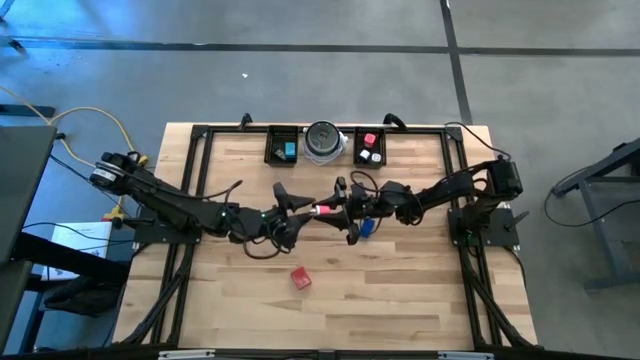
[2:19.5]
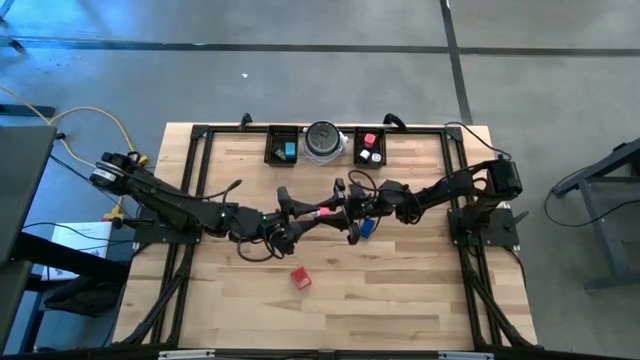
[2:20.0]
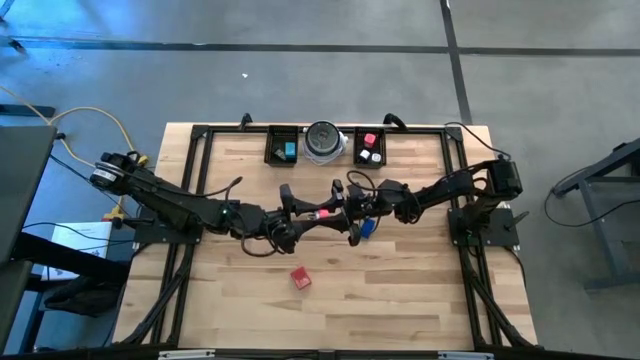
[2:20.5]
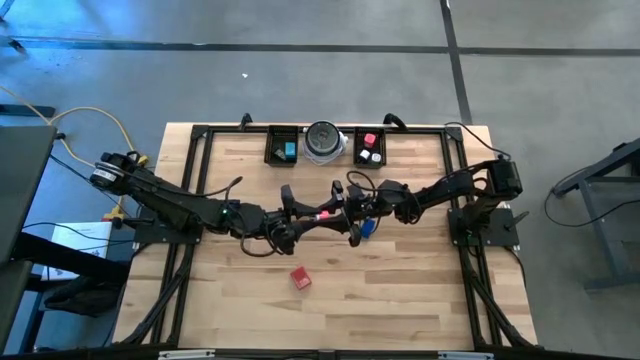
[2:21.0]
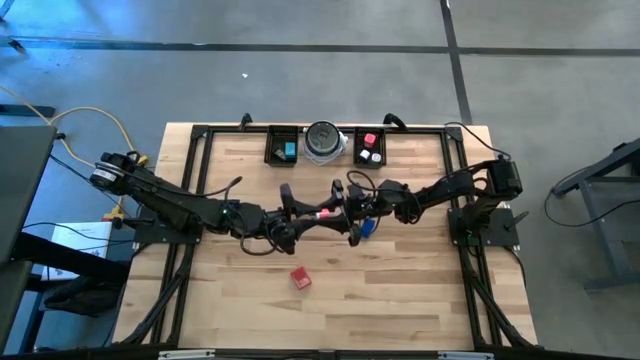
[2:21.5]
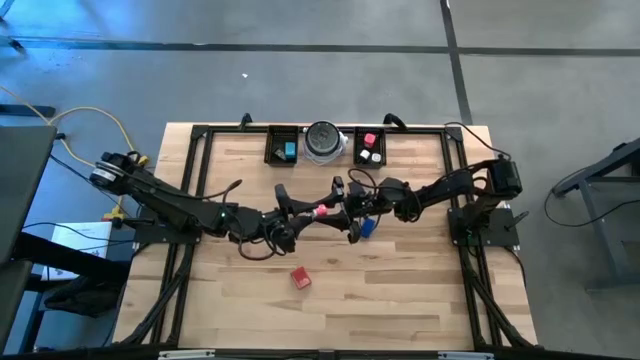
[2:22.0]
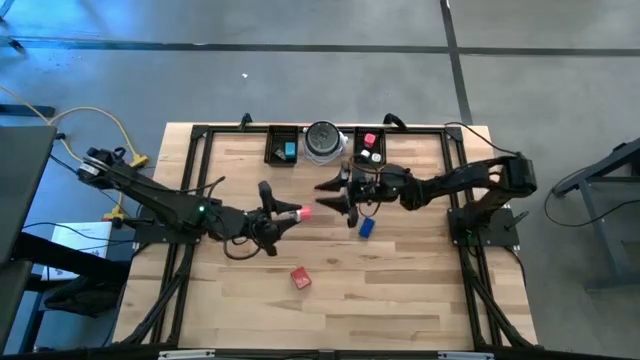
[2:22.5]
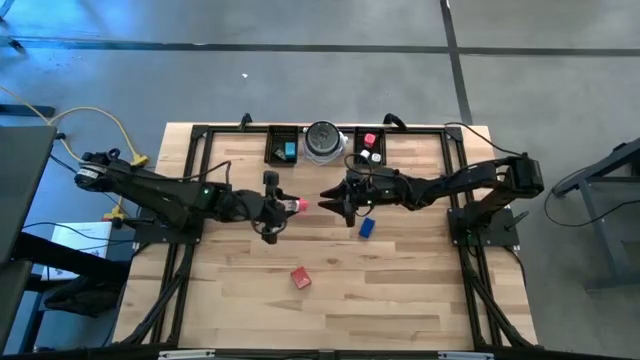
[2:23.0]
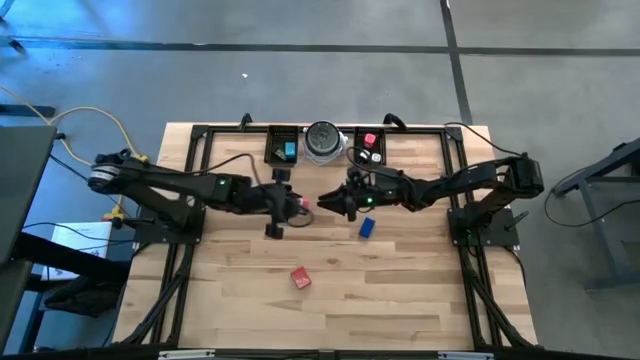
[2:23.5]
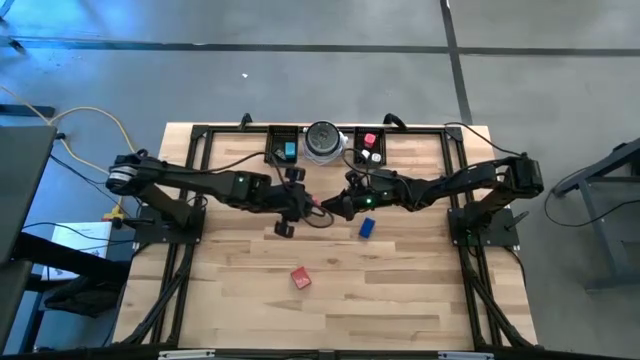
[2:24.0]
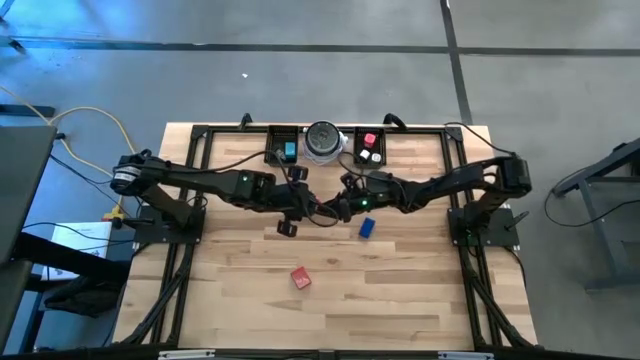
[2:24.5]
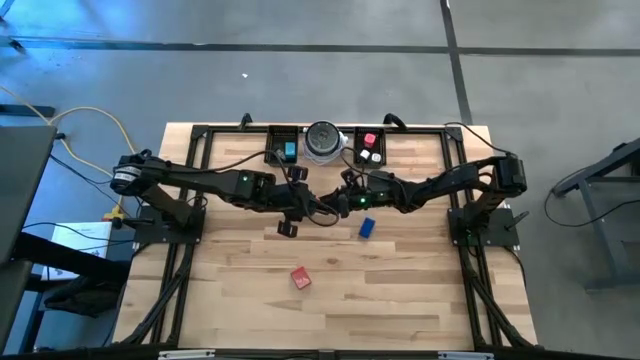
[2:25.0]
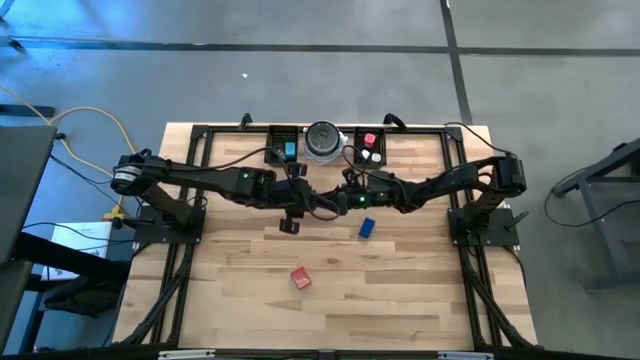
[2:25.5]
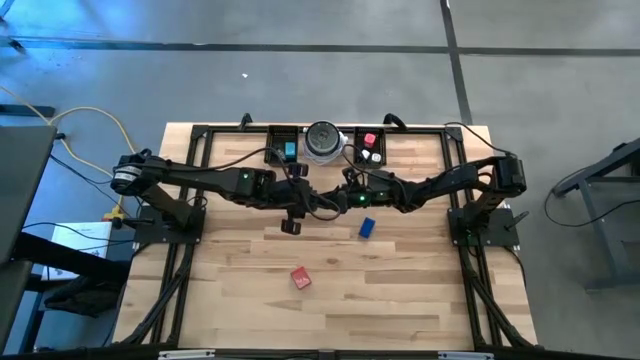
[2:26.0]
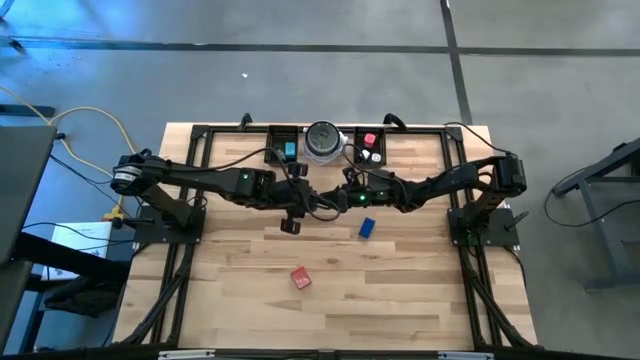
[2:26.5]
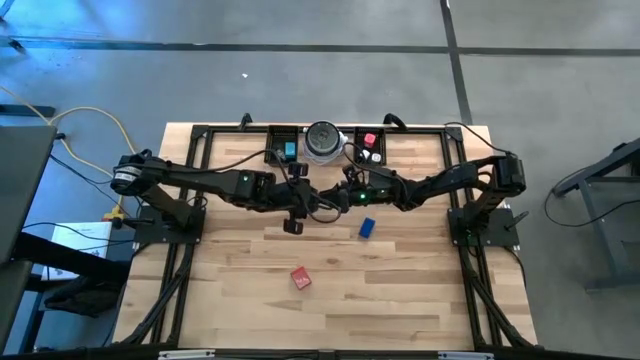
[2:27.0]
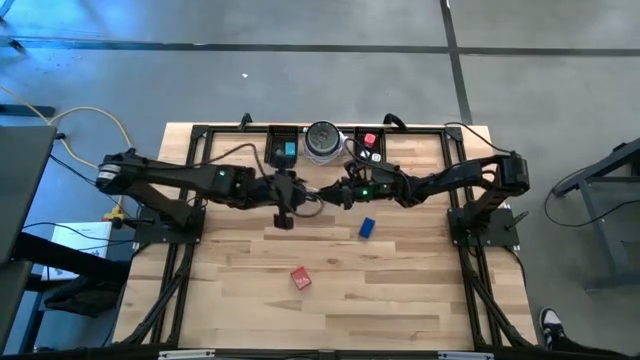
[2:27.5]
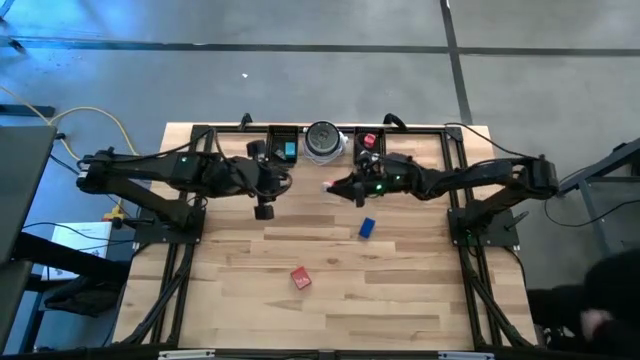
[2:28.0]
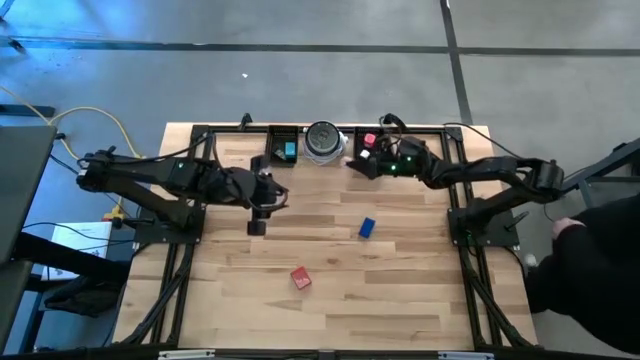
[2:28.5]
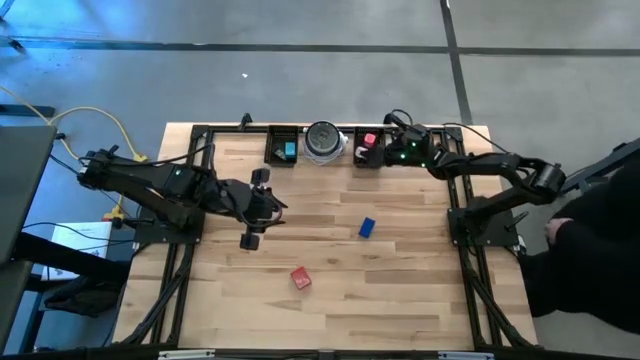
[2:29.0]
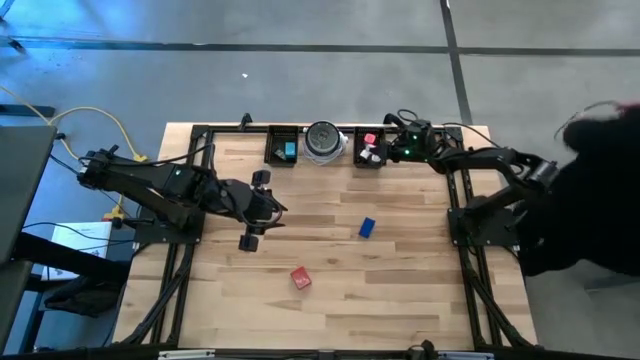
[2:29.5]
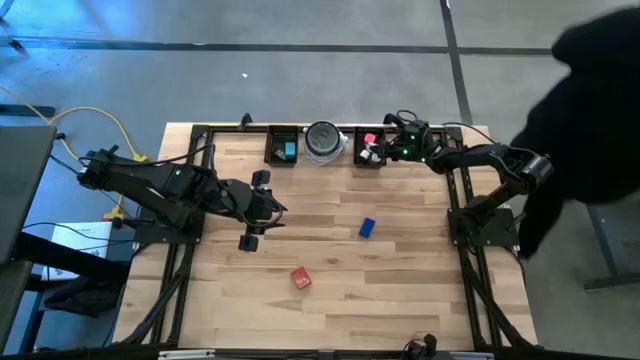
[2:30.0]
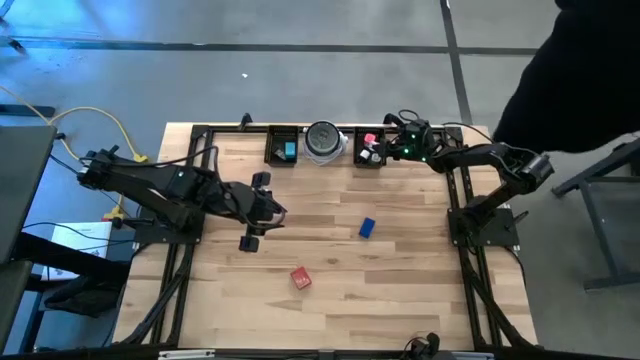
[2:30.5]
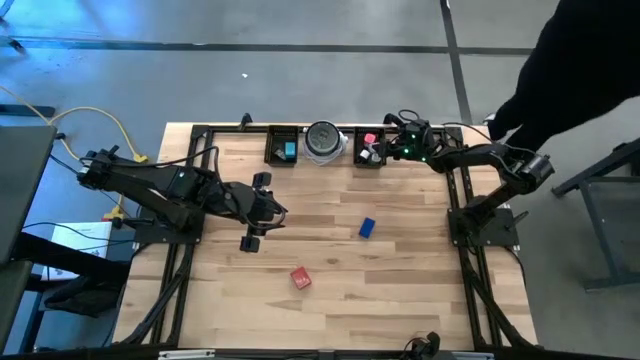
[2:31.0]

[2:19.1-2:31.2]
Task: Pick & Place Office items
Put the pink white charger adapter into the right black basket

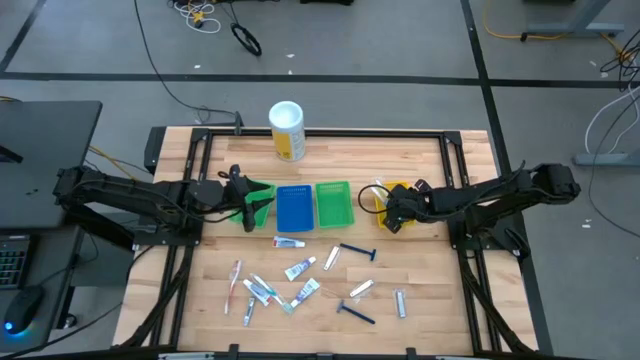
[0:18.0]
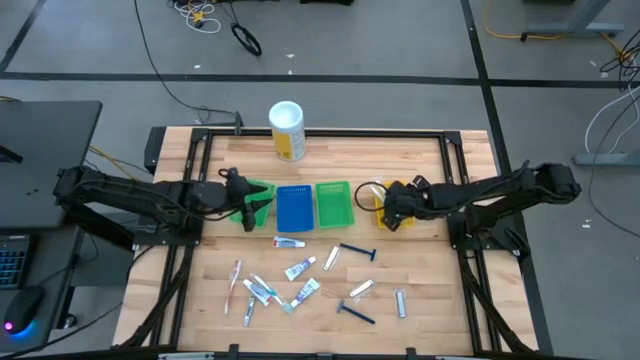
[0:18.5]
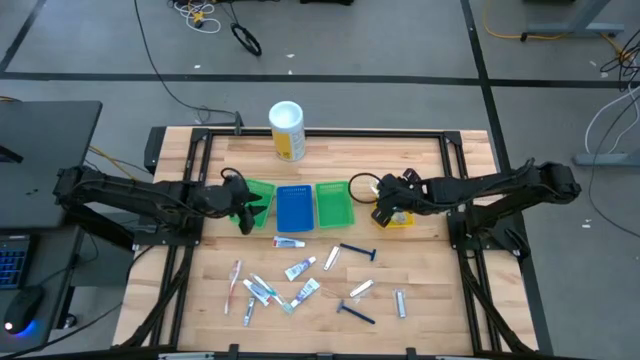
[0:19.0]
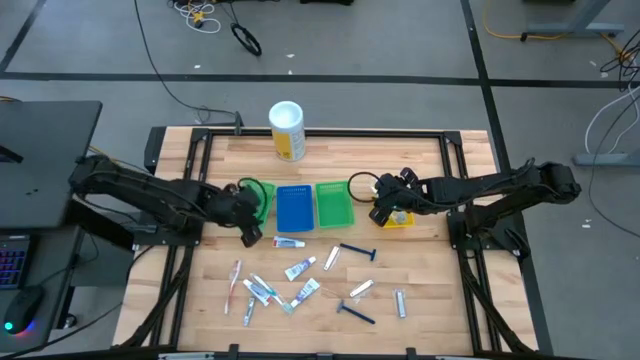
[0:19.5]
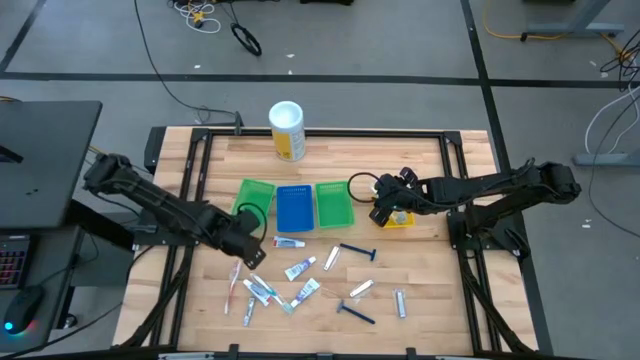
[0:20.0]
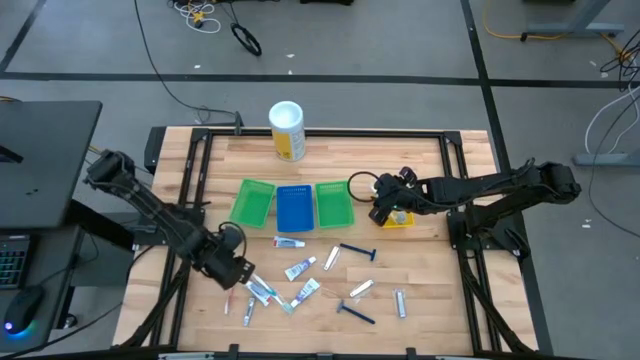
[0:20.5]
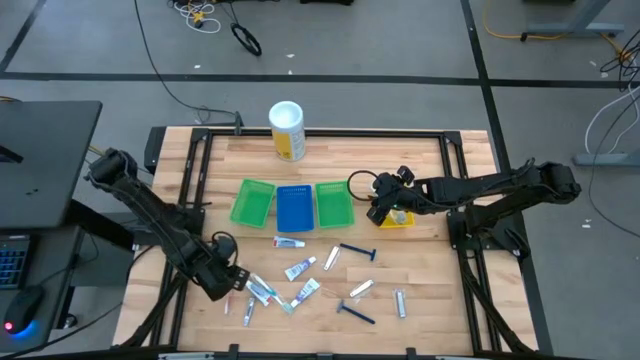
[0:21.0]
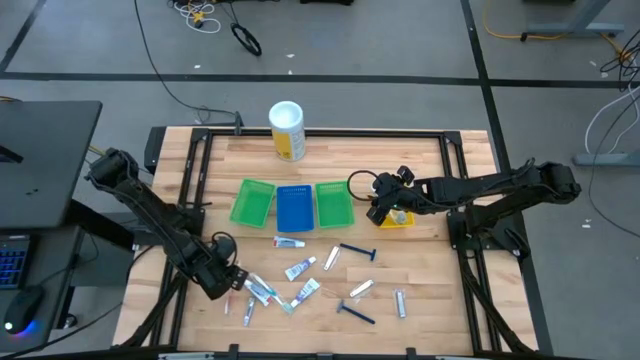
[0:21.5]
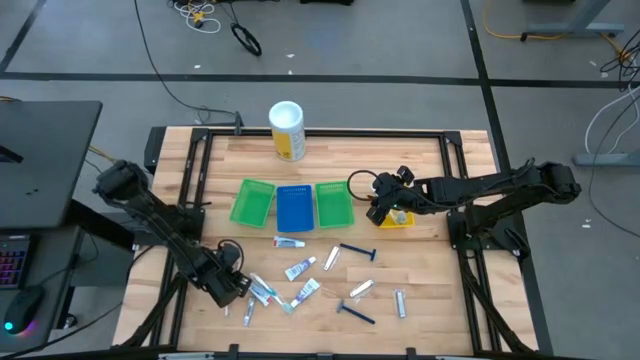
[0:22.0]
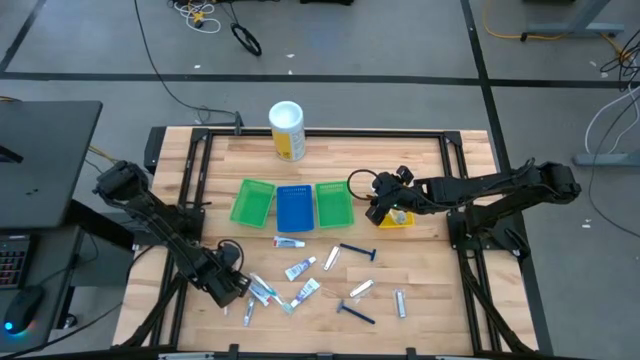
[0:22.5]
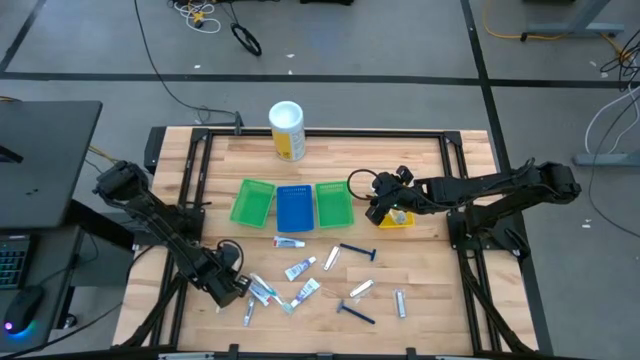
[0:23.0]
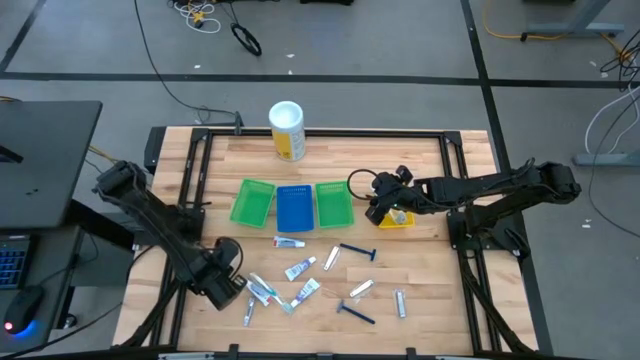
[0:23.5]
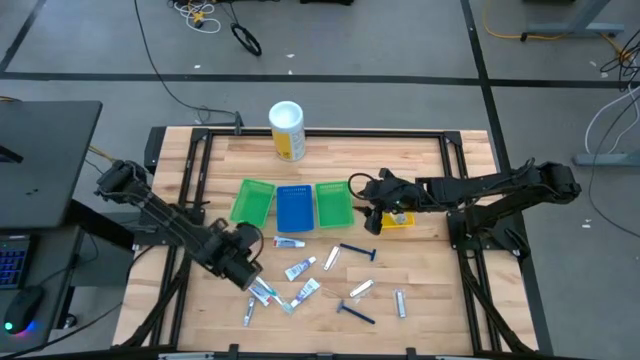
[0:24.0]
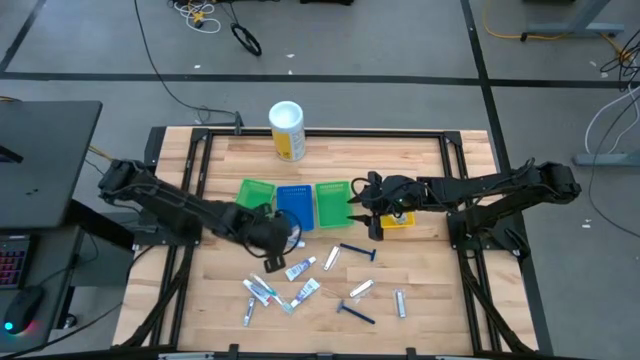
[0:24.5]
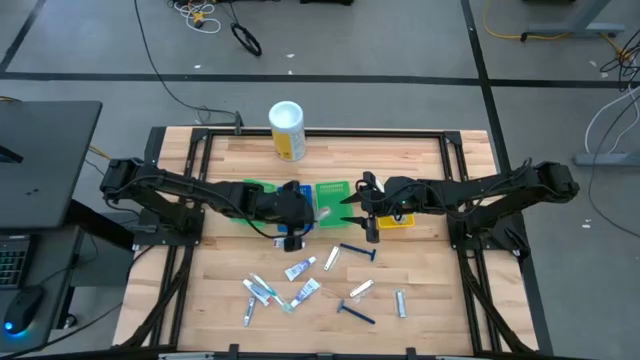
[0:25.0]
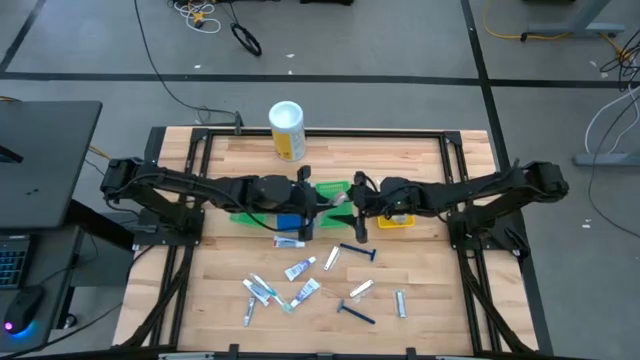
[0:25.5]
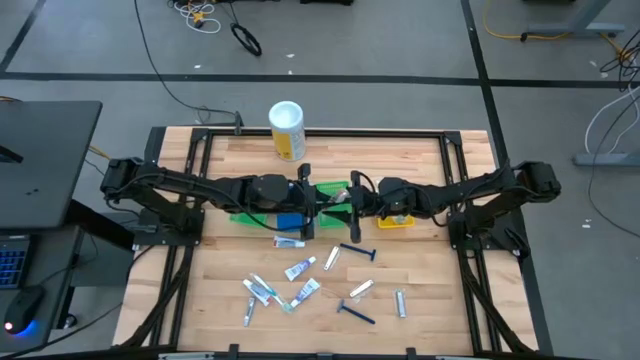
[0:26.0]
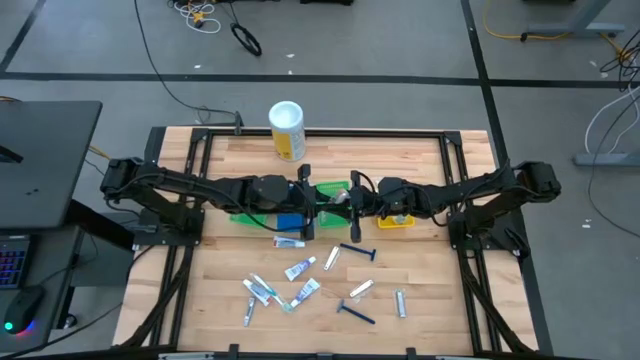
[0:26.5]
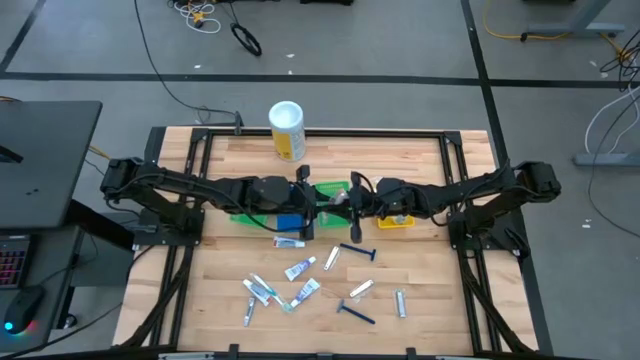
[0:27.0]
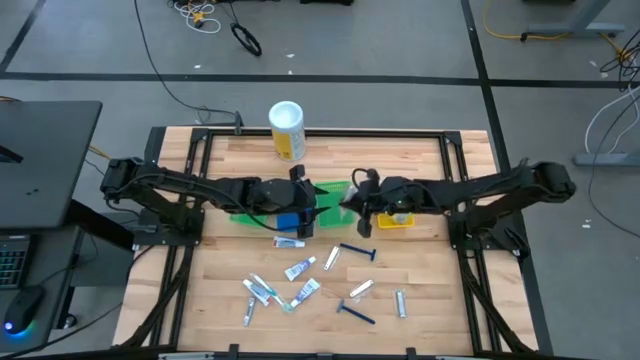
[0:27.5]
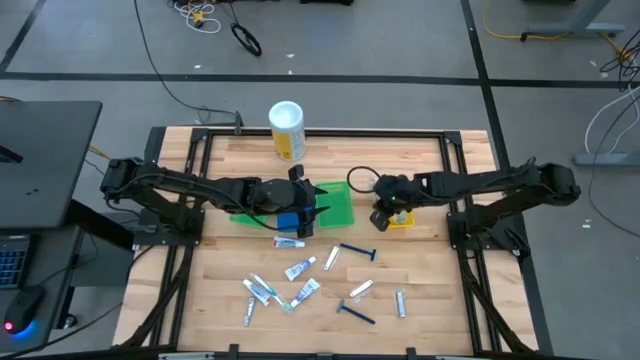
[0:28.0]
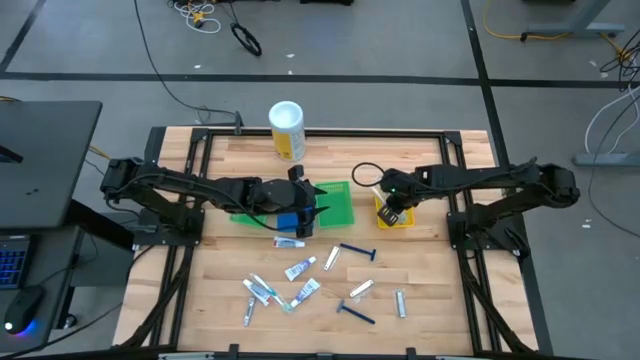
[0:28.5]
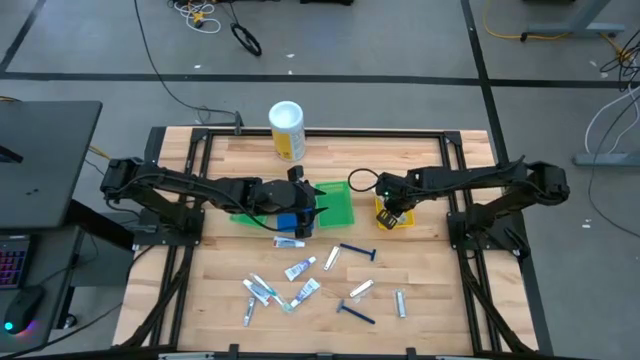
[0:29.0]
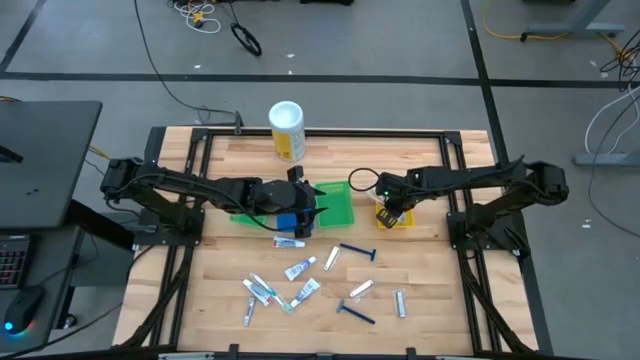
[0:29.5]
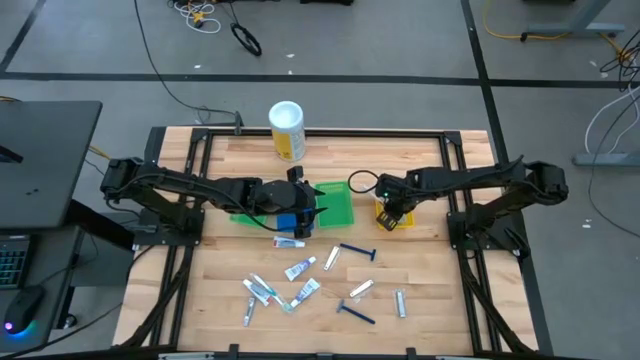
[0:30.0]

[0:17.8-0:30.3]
Task: Pick & Place Travel size toiletries
Put the red and white toothbrush into the yellow bin
